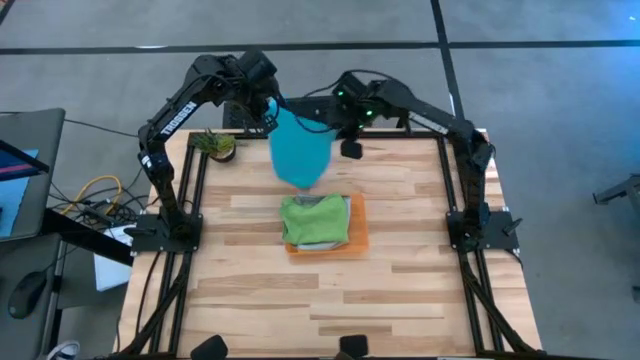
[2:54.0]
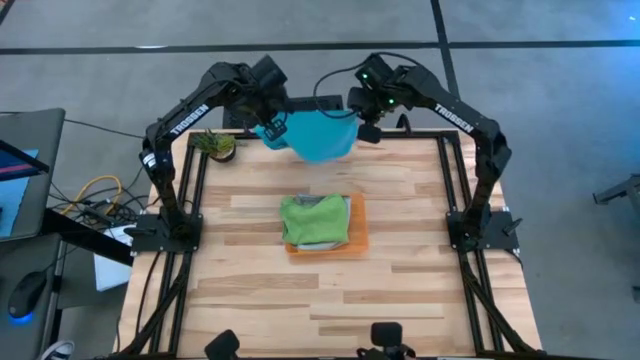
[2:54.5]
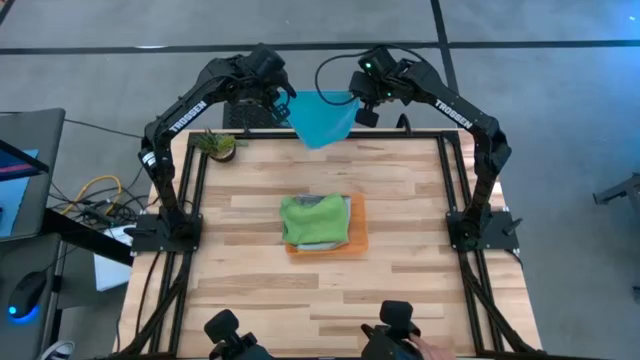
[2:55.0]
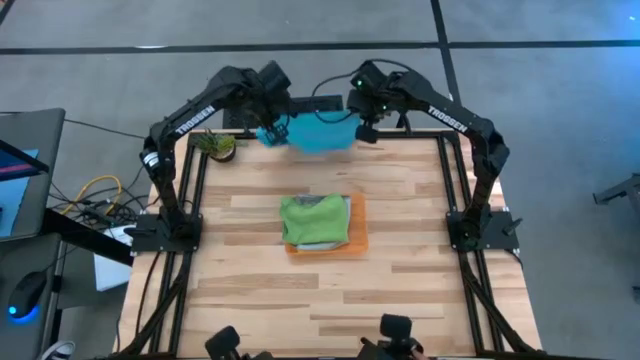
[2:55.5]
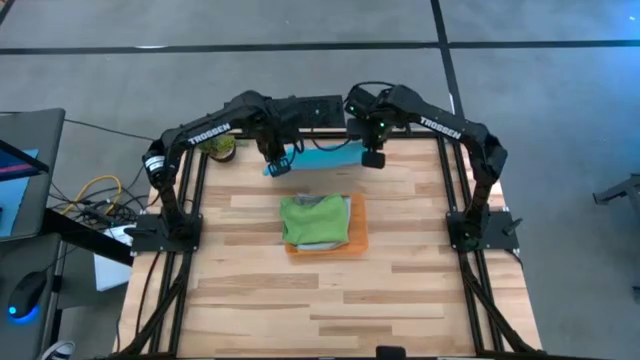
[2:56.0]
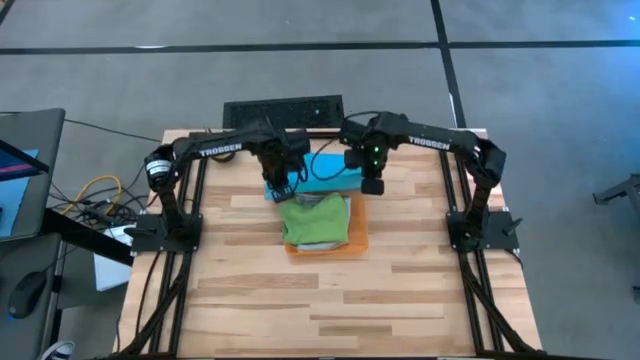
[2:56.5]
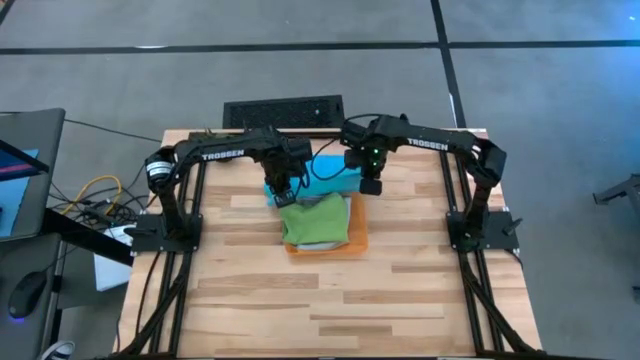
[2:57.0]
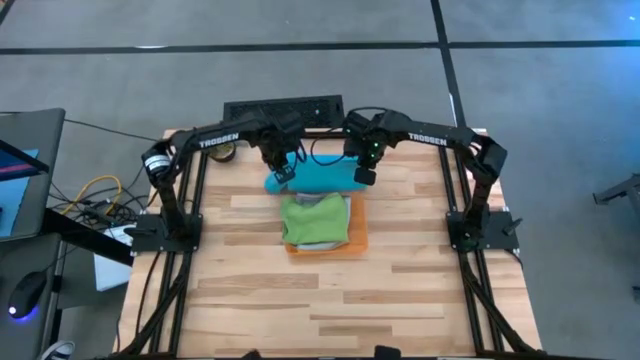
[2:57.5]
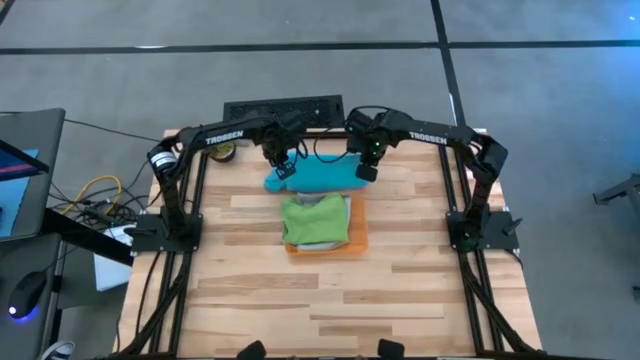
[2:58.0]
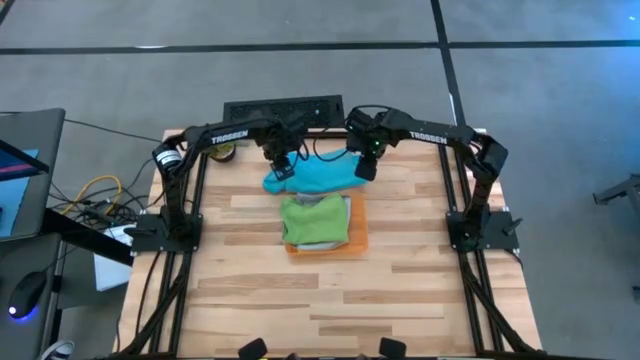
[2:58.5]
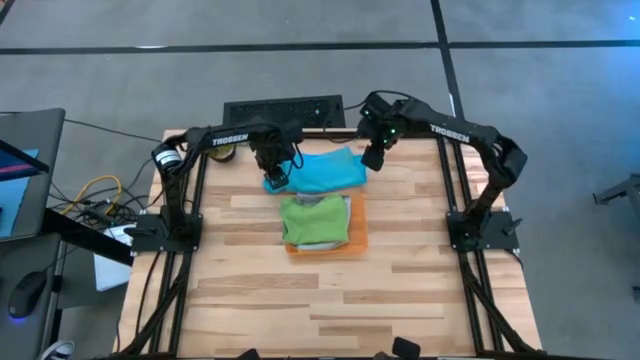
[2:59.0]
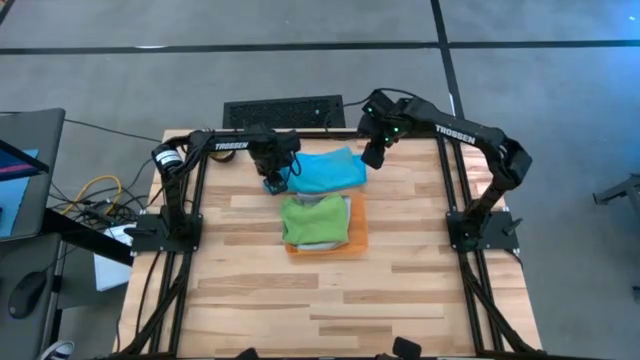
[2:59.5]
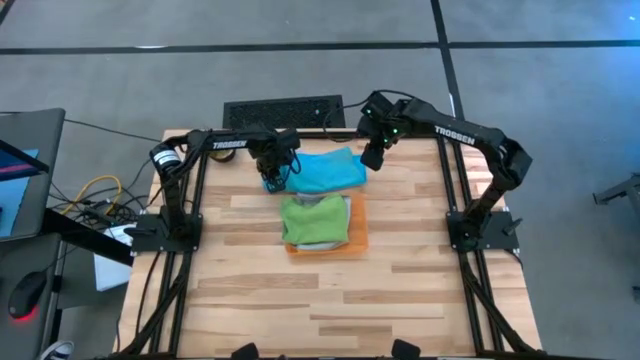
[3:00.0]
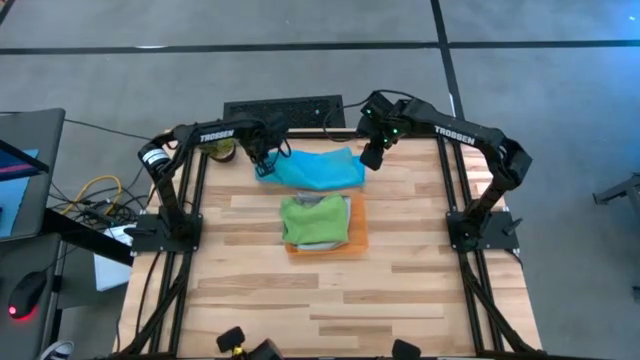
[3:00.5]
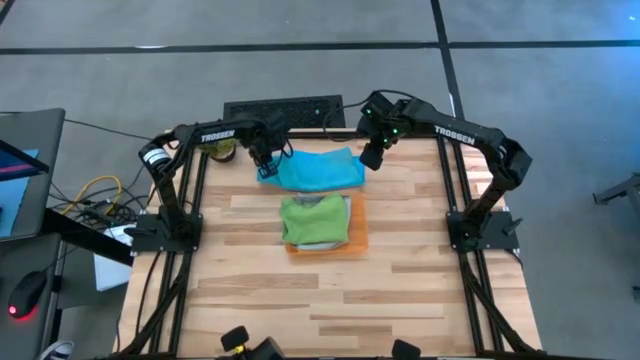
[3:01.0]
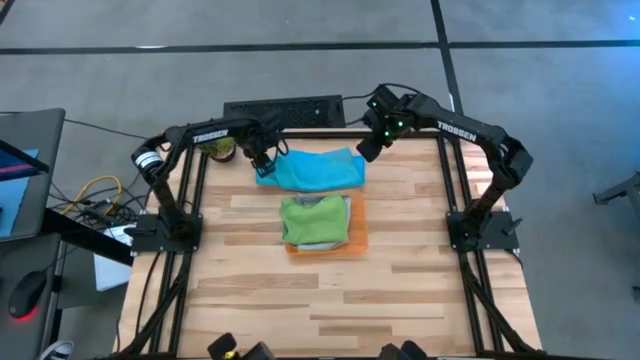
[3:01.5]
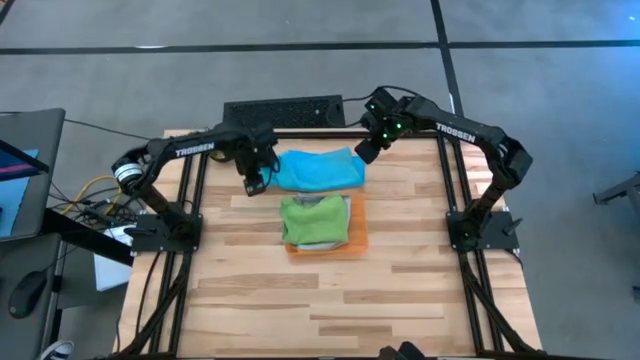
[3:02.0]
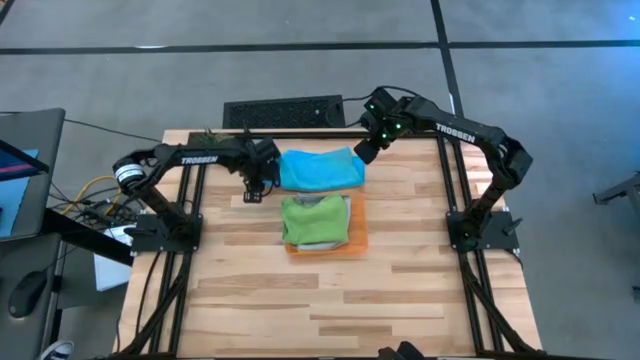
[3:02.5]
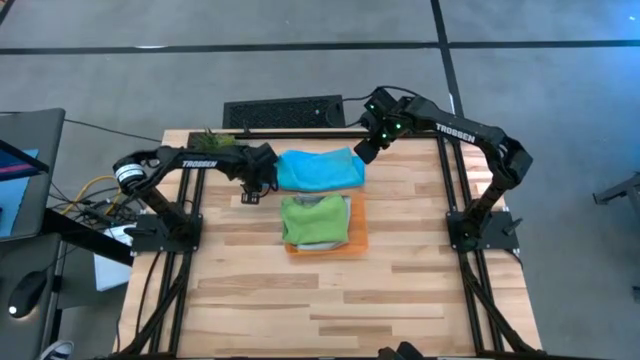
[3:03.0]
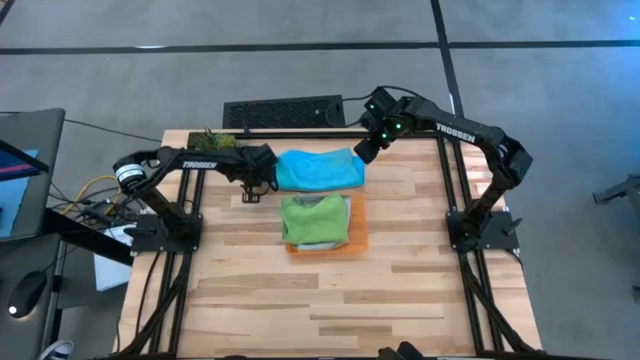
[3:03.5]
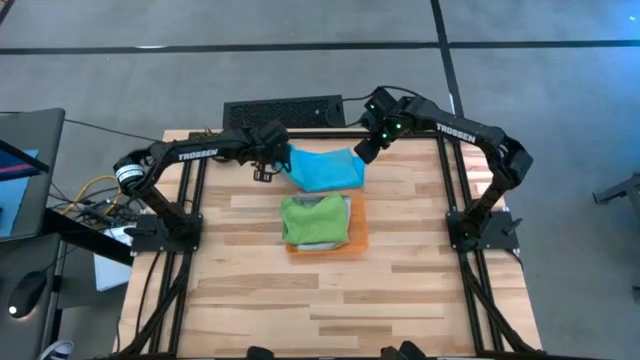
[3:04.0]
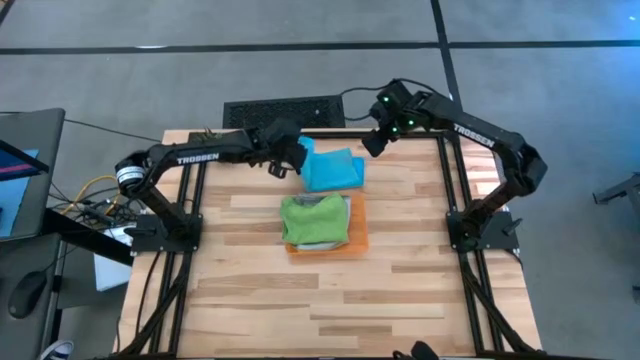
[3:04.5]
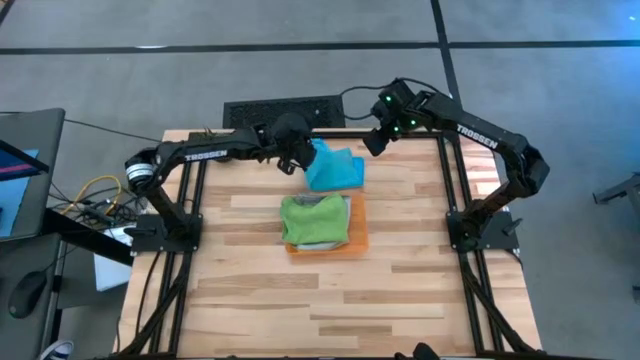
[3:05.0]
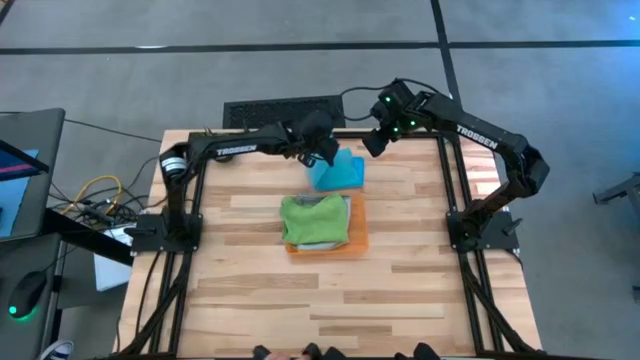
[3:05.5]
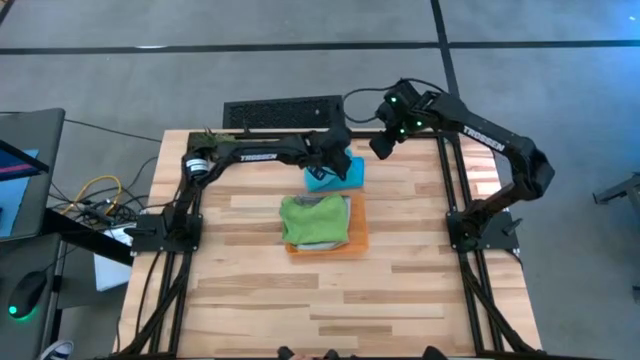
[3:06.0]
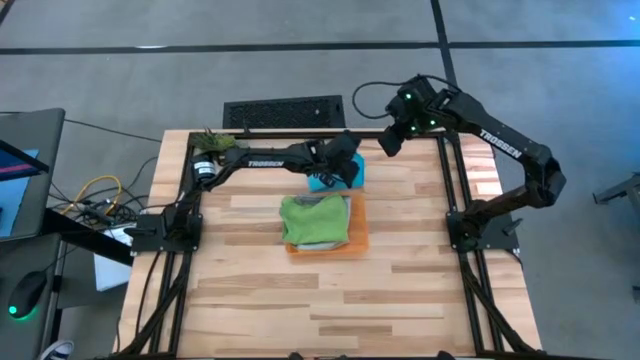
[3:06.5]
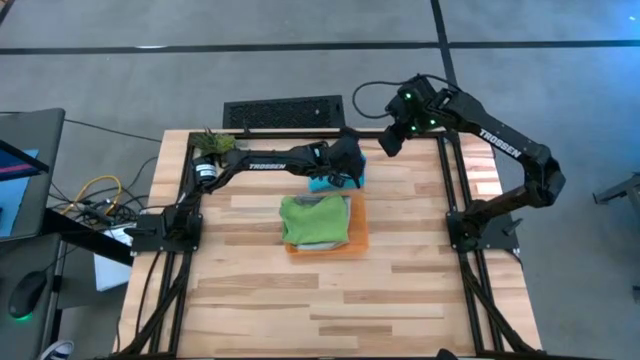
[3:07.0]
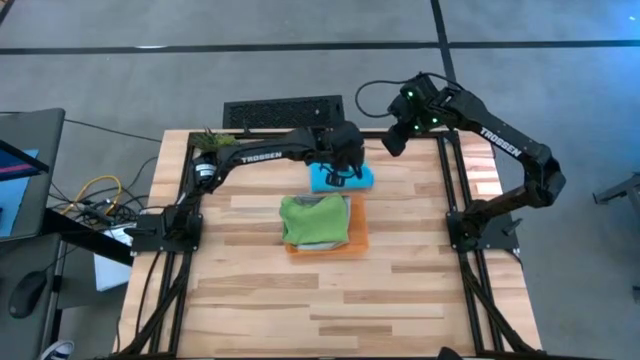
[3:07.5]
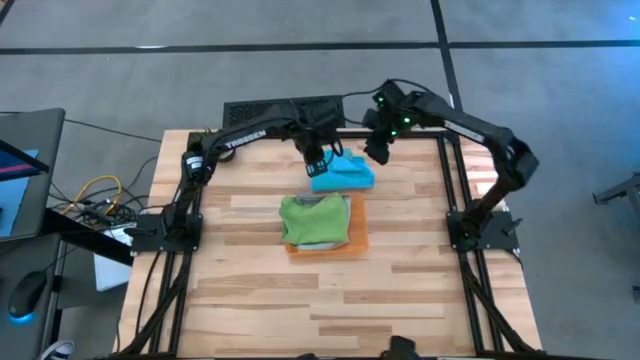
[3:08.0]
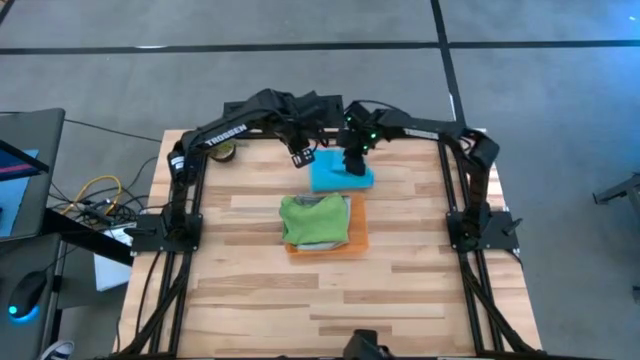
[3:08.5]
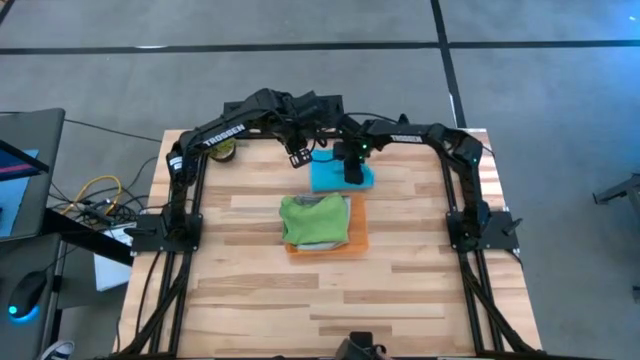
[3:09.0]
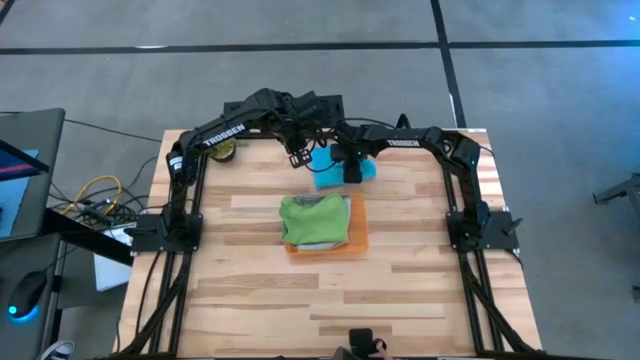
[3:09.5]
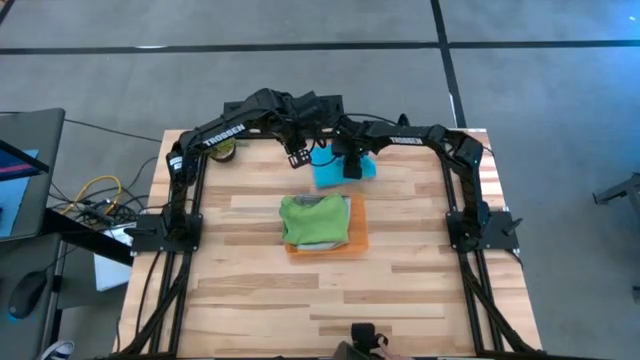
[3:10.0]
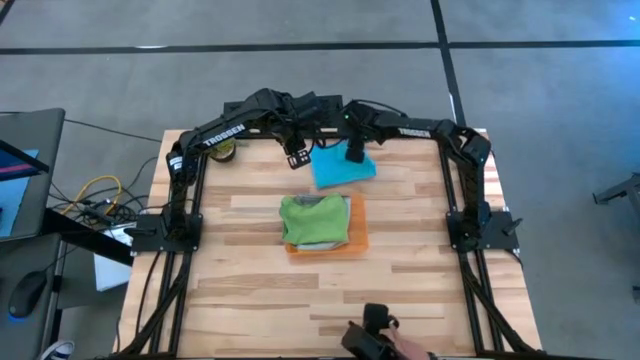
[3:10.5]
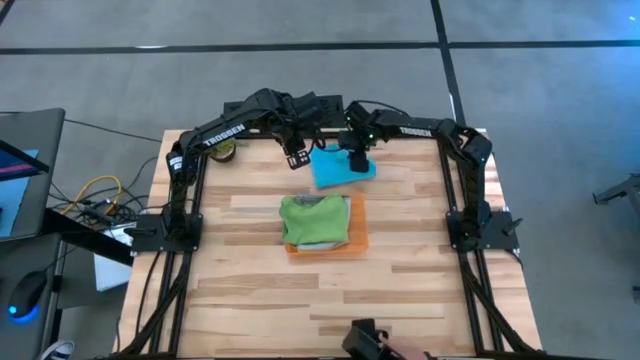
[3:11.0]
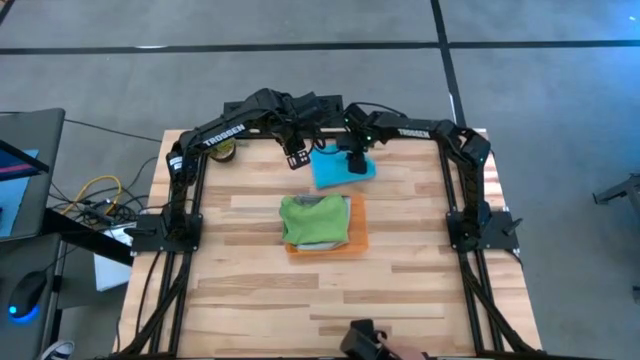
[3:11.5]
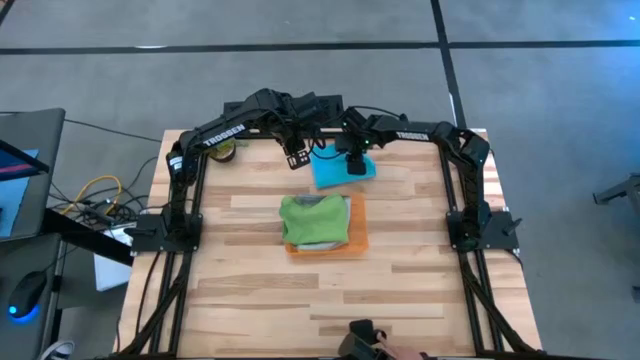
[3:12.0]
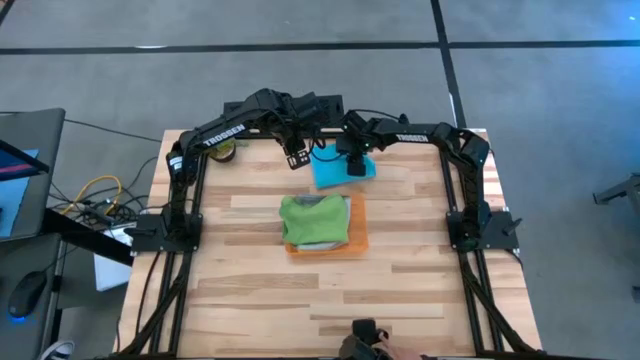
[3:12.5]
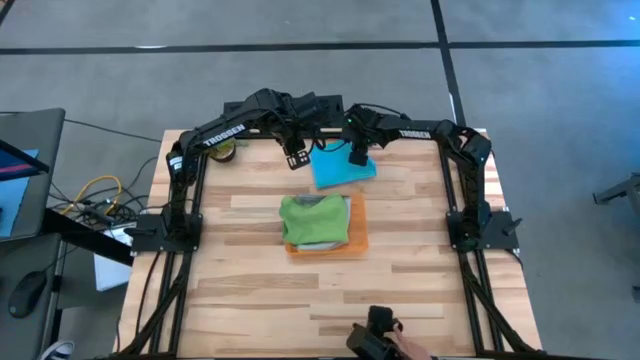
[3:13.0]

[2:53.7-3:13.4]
Task: Sort microfiber towel by color & place in baskets
Fold the blue towel

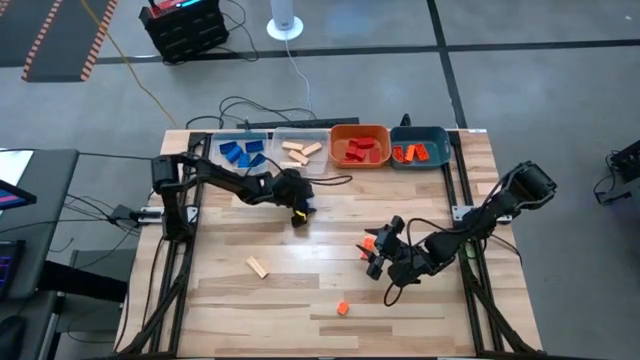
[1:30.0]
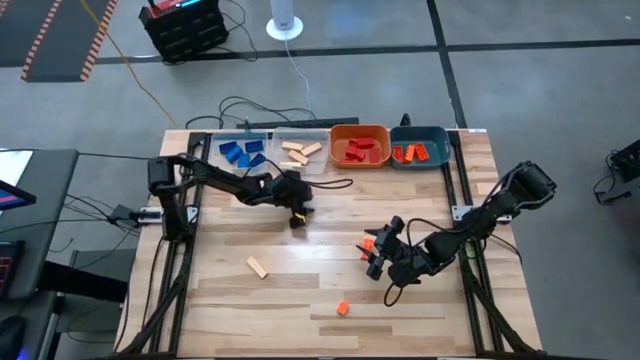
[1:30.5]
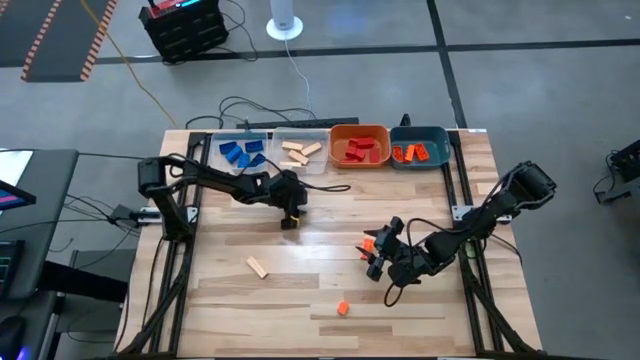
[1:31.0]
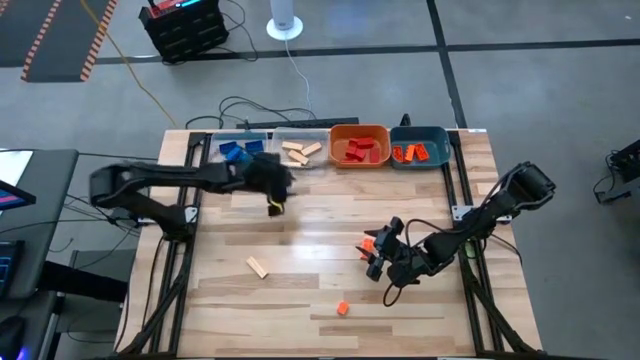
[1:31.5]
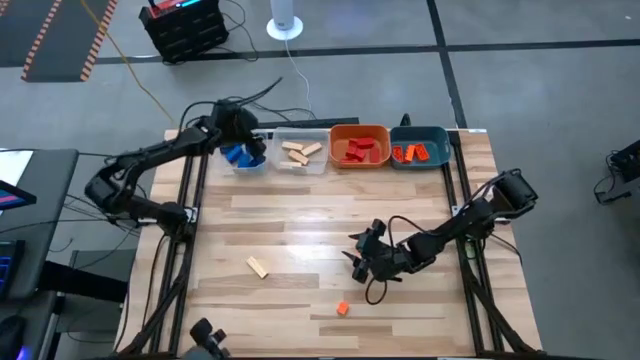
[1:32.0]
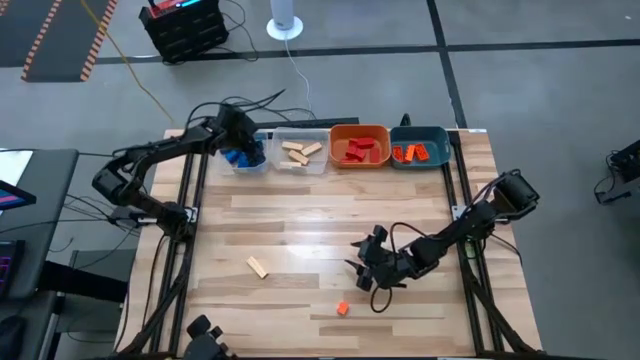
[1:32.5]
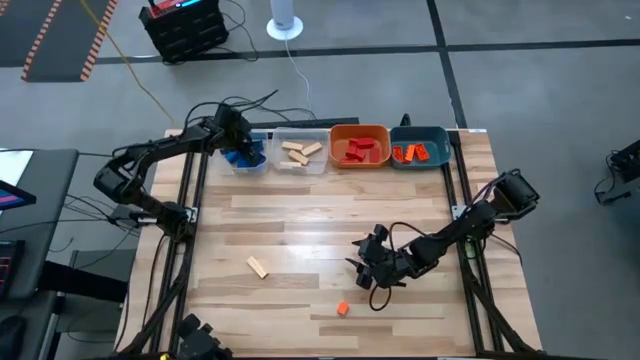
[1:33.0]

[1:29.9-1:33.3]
Task: Sort blocks
Put the blue game piece into the left transparent bin
